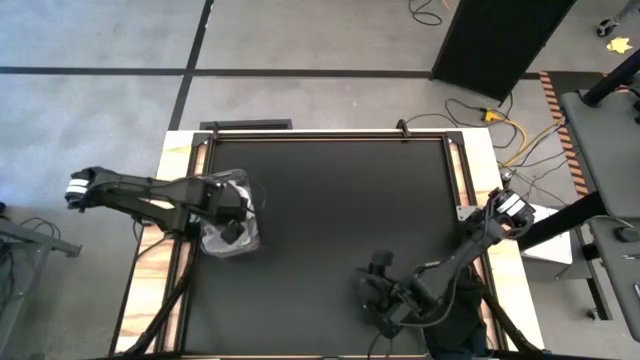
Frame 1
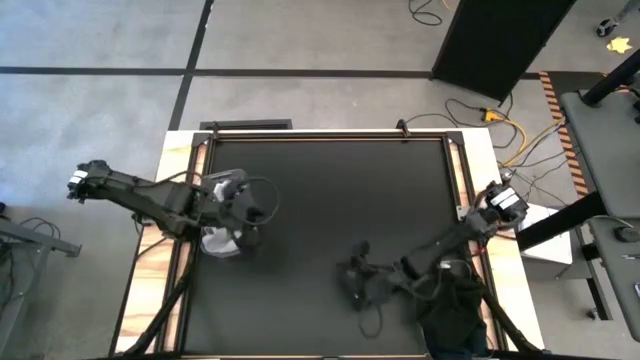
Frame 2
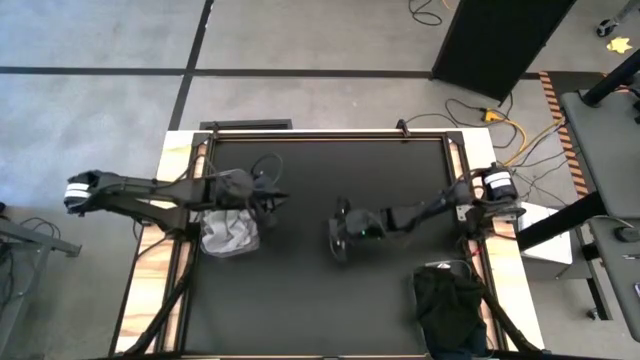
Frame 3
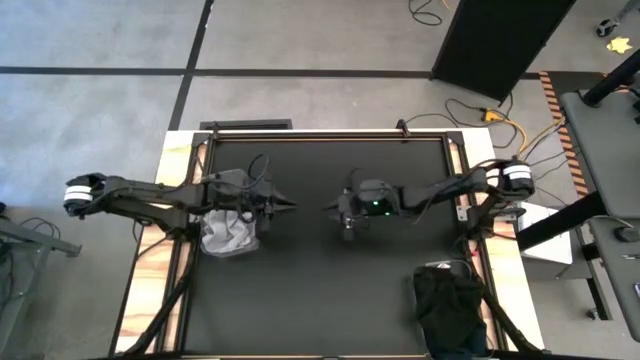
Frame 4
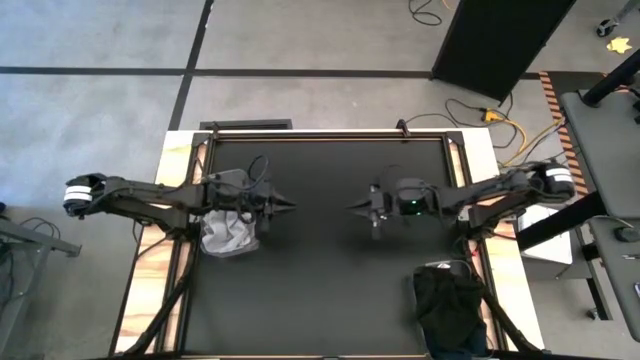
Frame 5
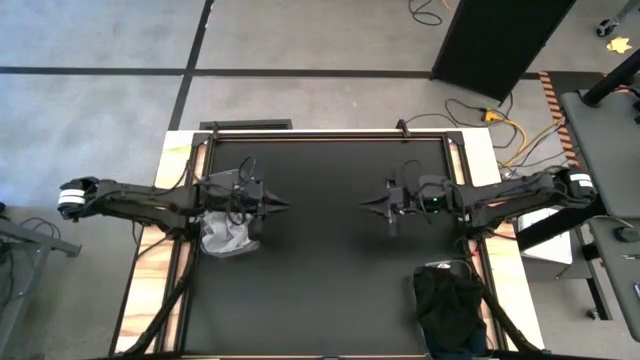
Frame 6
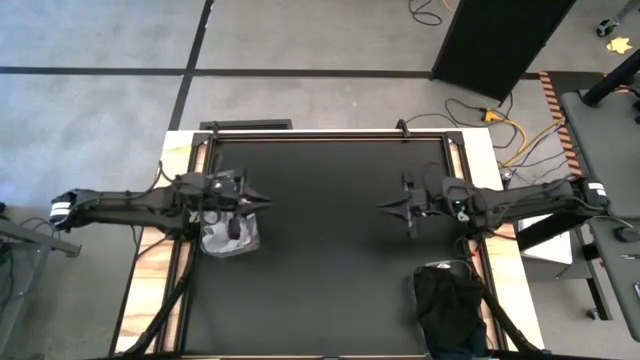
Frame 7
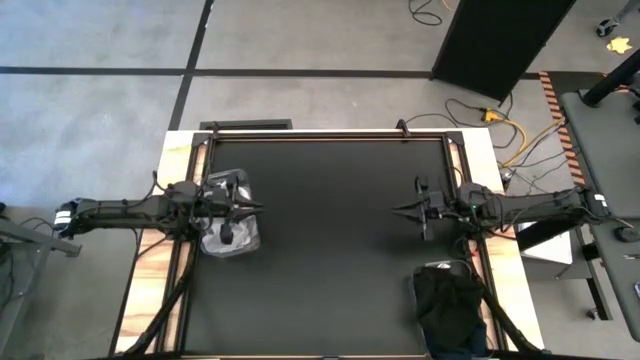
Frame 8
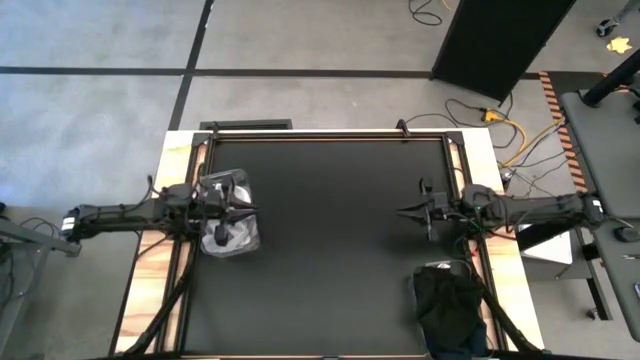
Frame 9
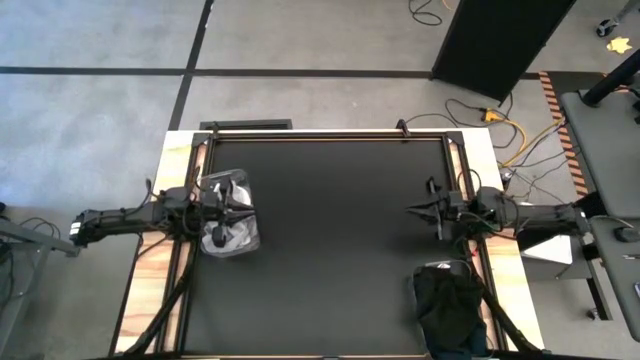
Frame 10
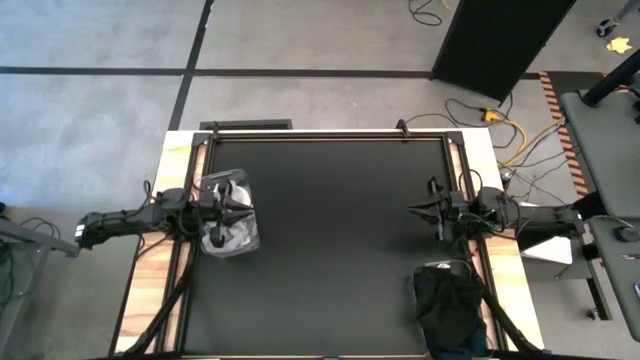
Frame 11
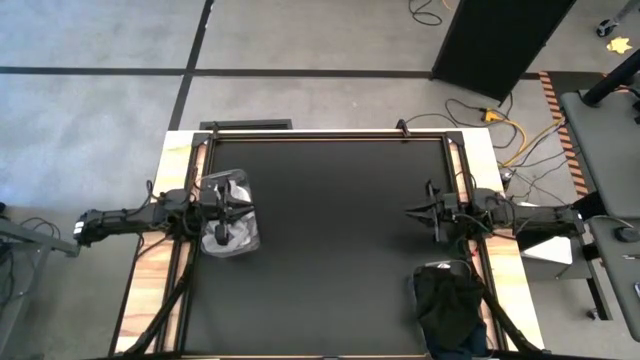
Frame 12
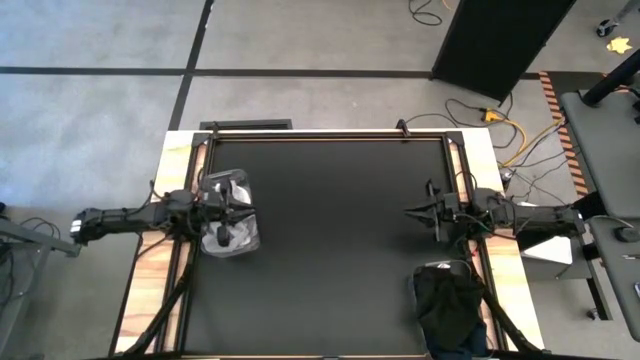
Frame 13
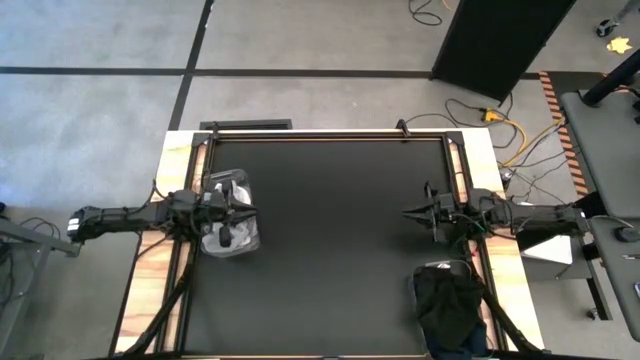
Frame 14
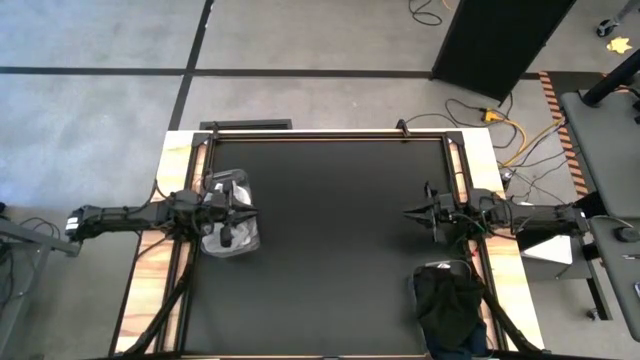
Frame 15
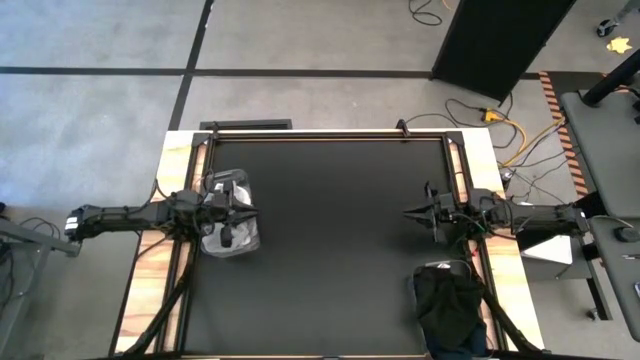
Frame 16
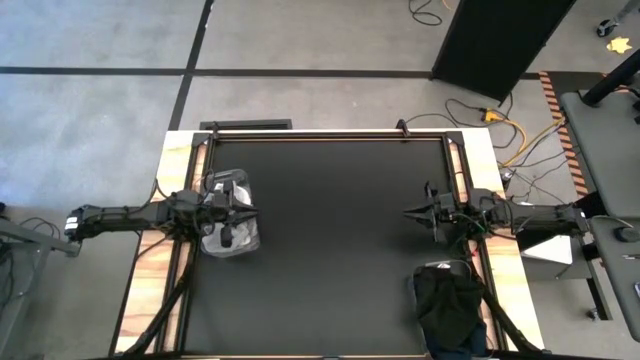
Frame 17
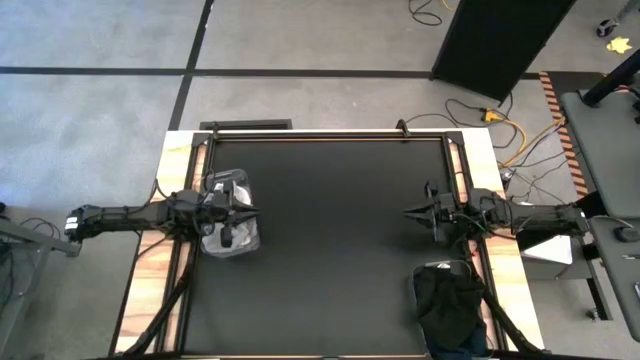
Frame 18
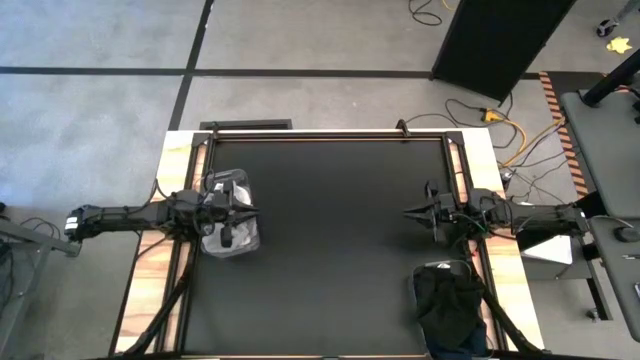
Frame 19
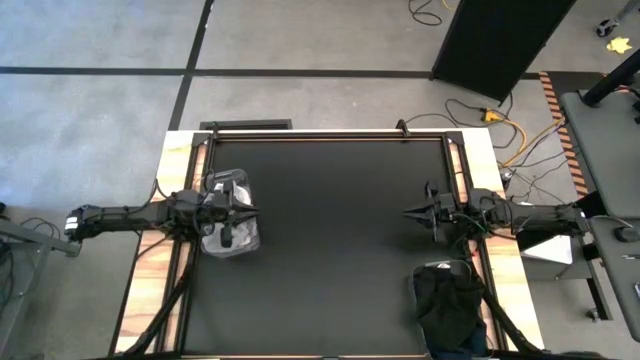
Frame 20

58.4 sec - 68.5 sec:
Task: Sort towels by color in basket
Return to Home Position

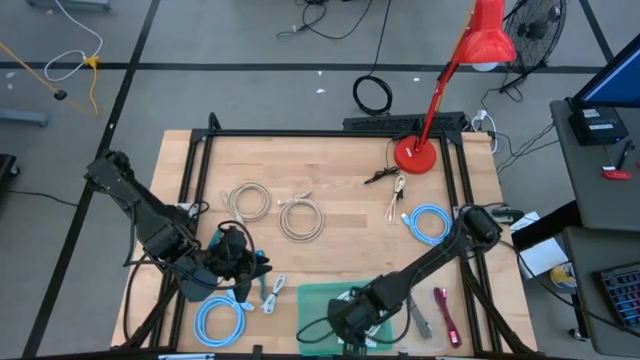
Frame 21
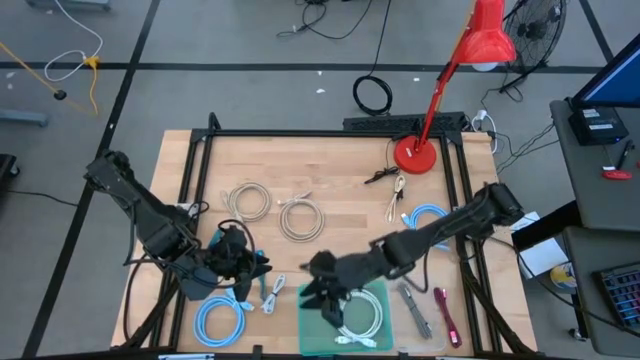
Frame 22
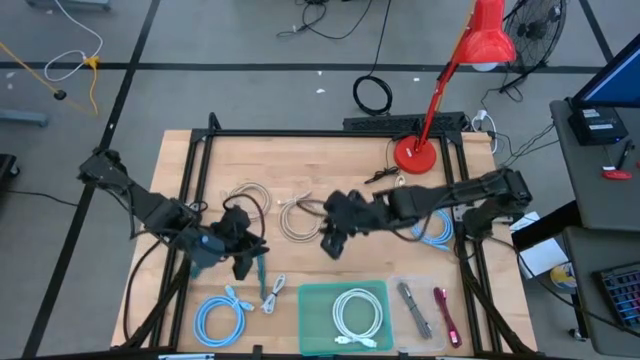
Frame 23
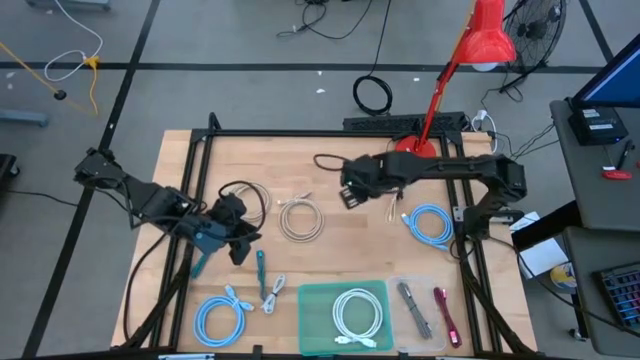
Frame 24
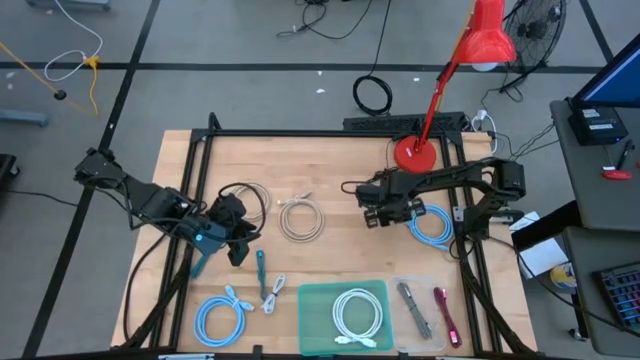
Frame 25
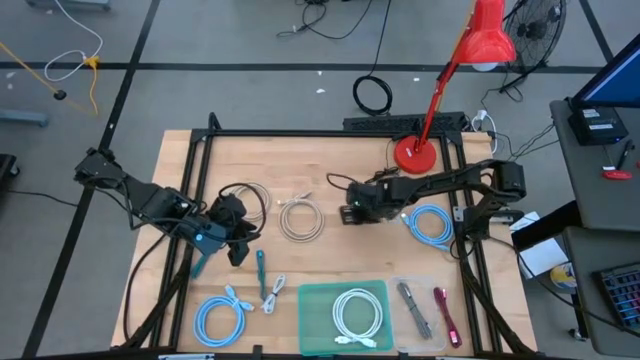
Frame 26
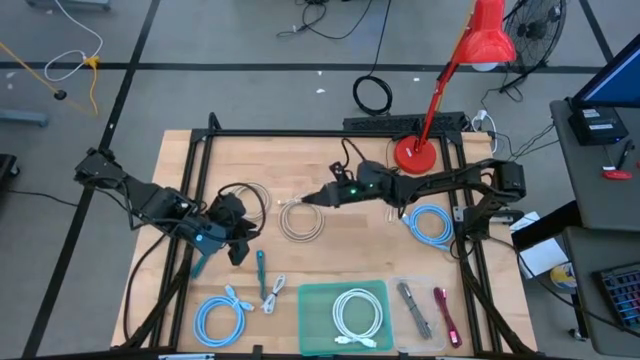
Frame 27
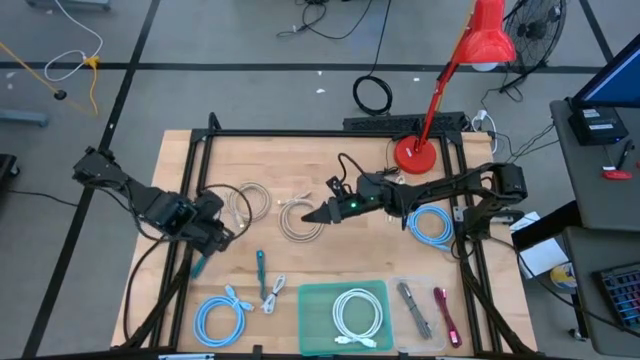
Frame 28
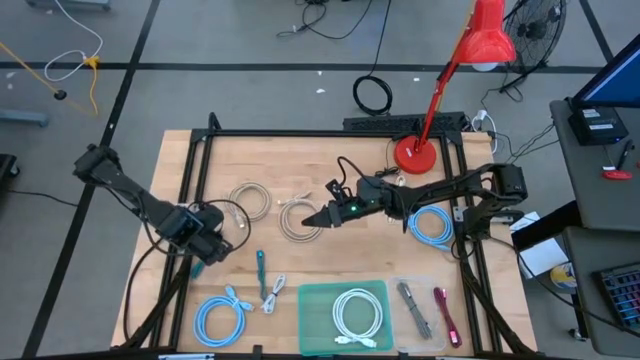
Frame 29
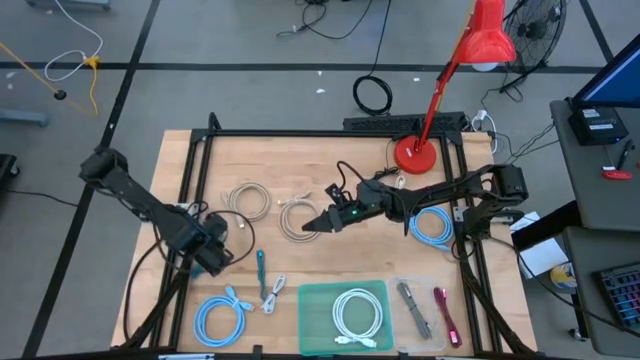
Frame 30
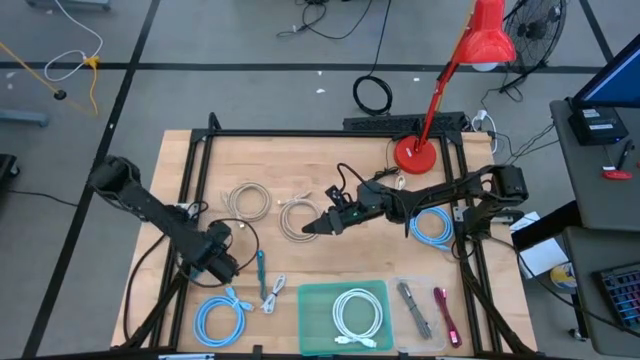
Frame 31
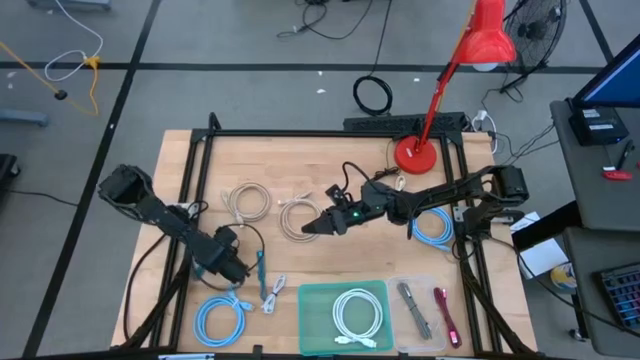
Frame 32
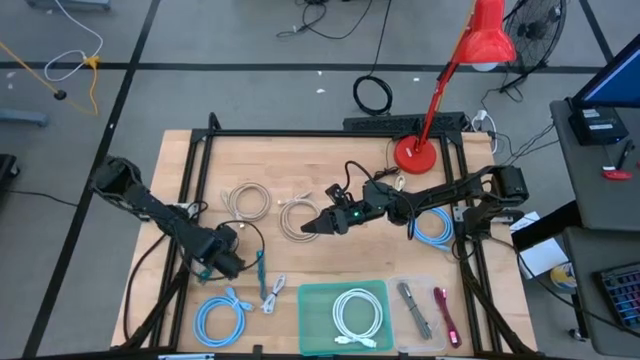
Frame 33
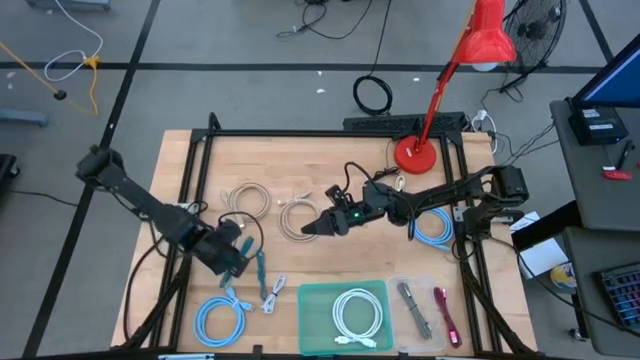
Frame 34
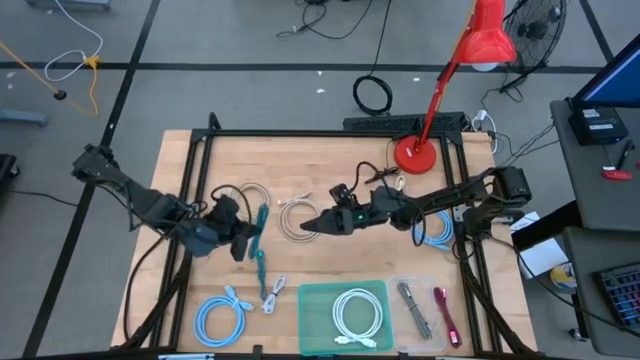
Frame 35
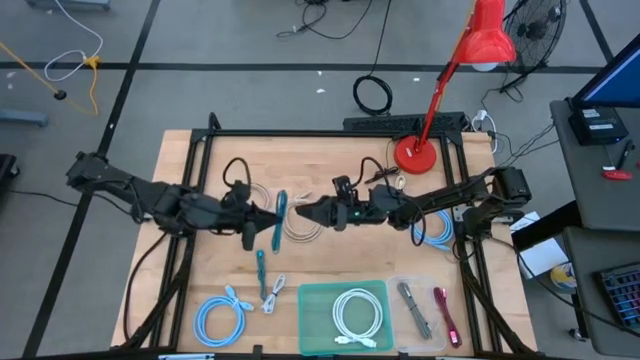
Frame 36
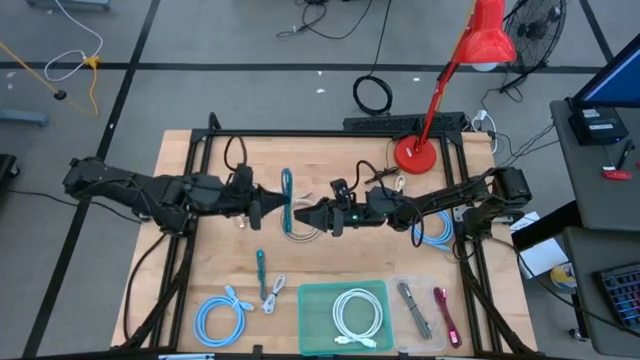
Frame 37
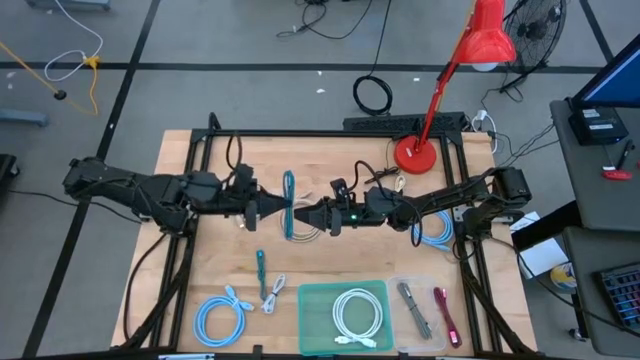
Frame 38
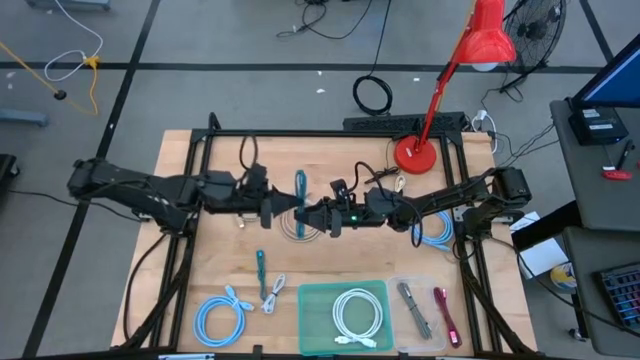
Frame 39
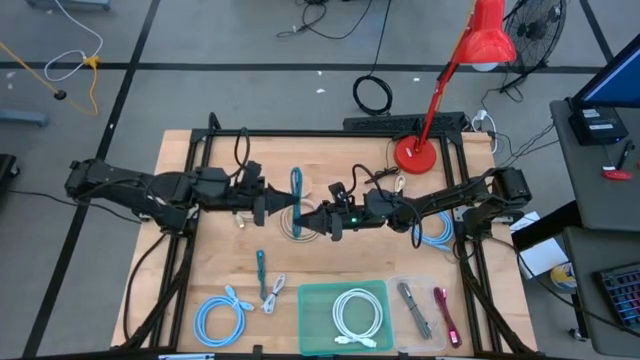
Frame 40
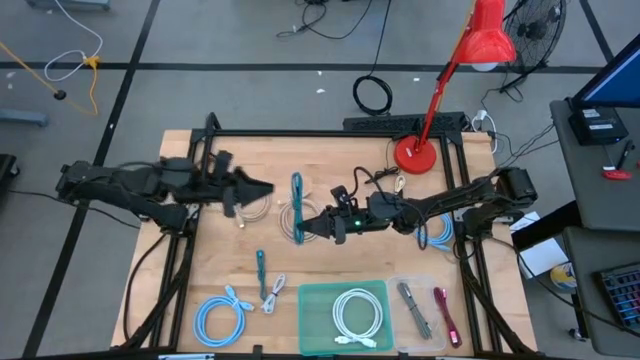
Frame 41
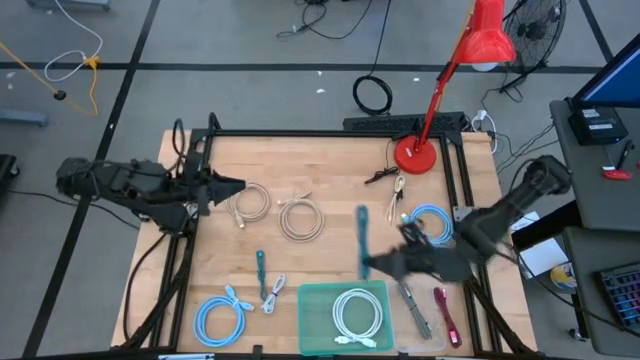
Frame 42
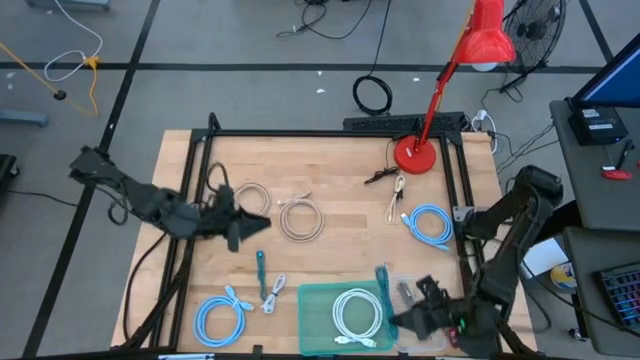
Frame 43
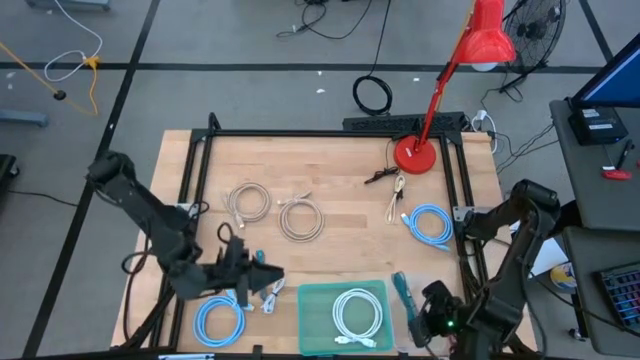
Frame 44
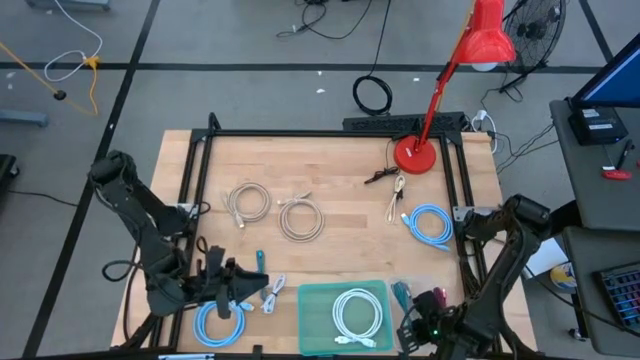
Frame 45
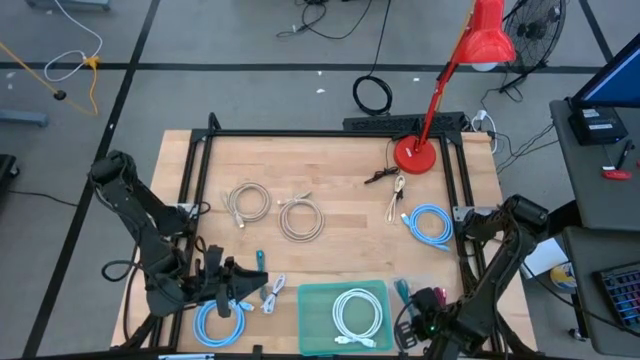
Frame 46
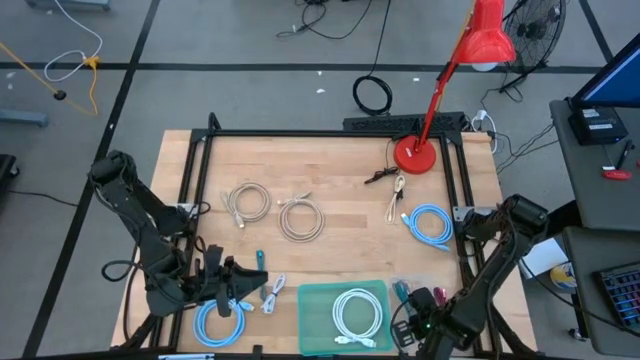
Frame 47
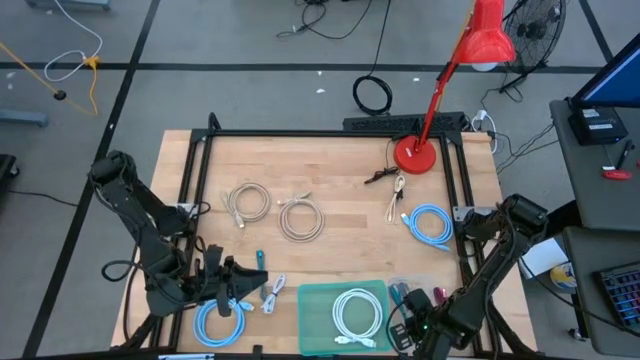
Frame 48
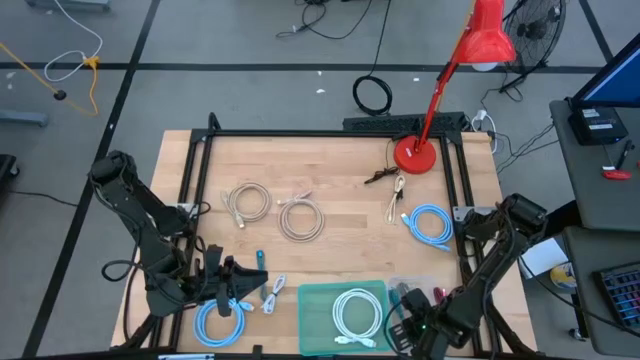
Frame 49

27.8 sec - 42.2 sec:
Task: Pick & Place USB Port
Put the left blue charger cable into the white transparent bin
